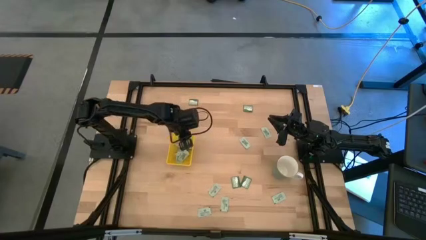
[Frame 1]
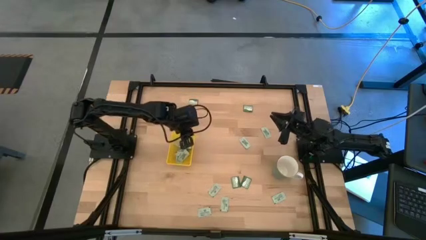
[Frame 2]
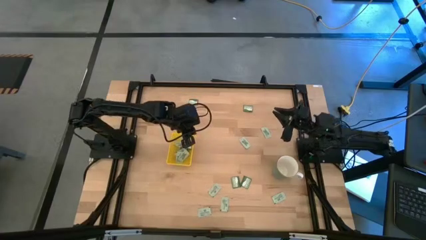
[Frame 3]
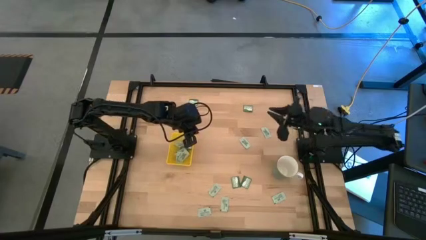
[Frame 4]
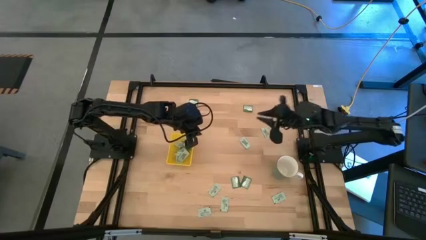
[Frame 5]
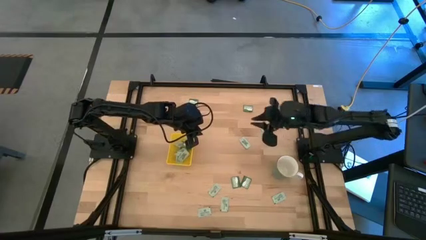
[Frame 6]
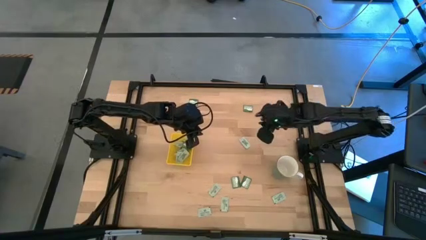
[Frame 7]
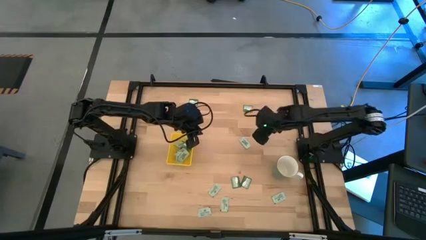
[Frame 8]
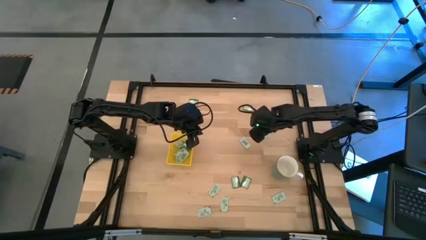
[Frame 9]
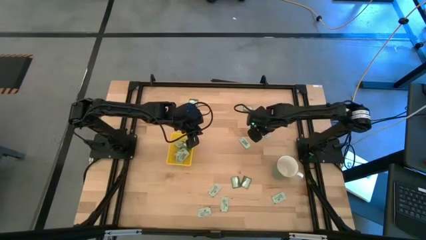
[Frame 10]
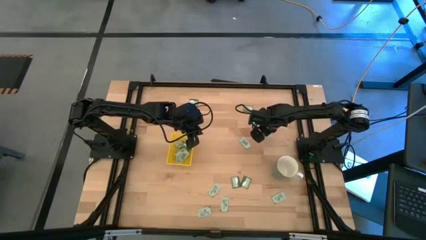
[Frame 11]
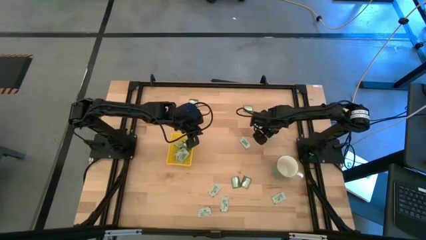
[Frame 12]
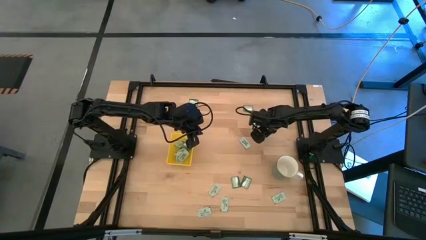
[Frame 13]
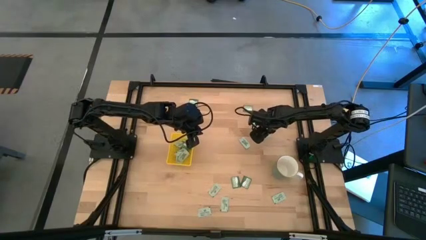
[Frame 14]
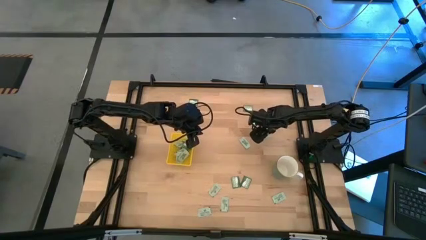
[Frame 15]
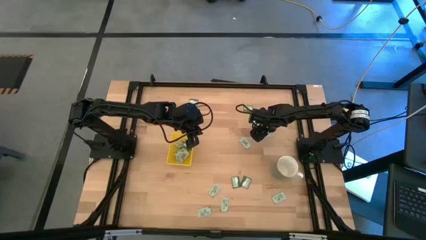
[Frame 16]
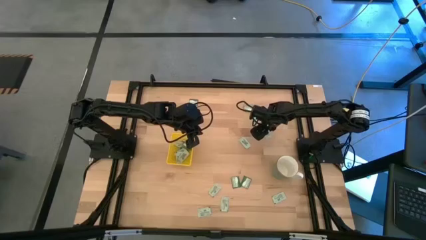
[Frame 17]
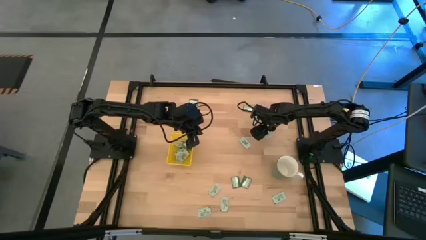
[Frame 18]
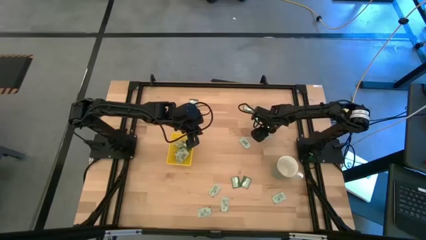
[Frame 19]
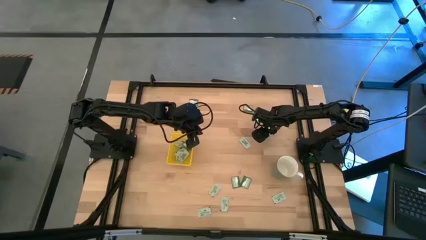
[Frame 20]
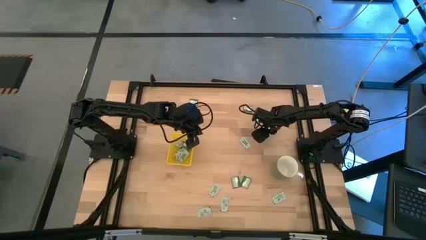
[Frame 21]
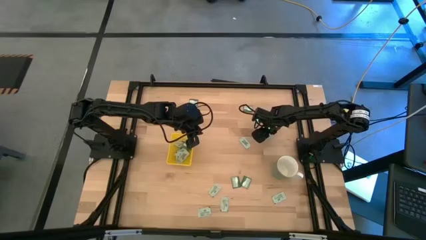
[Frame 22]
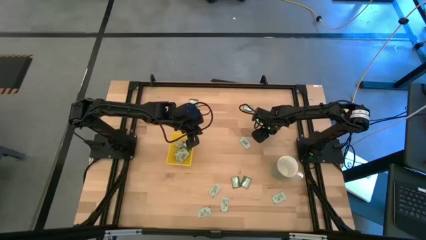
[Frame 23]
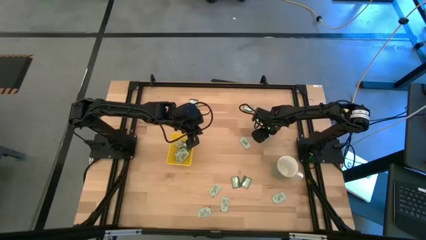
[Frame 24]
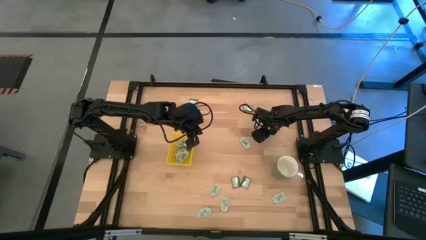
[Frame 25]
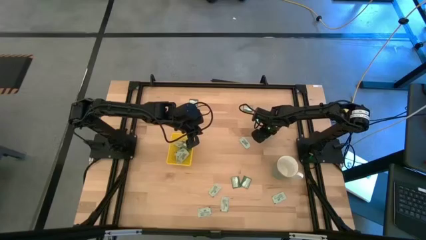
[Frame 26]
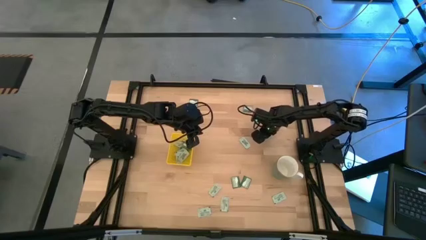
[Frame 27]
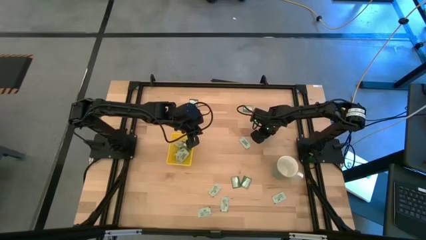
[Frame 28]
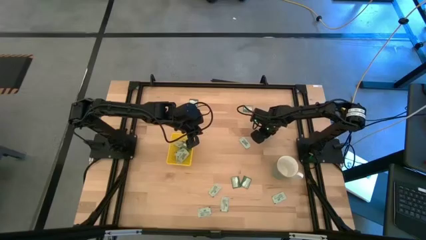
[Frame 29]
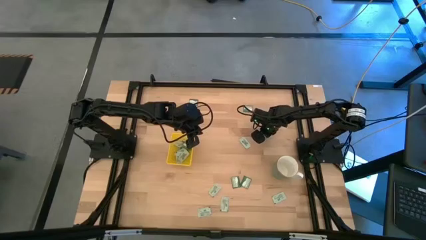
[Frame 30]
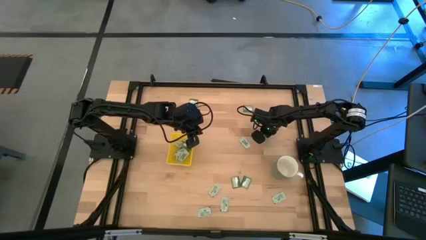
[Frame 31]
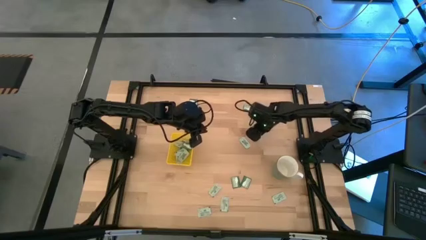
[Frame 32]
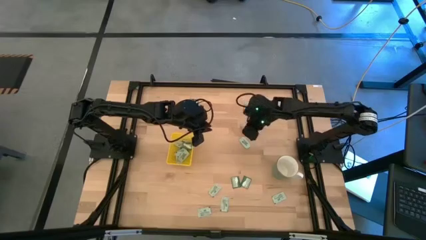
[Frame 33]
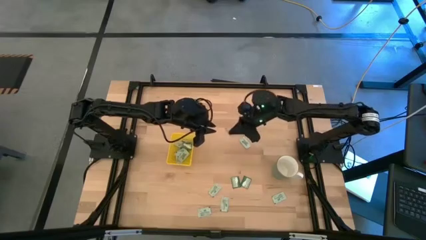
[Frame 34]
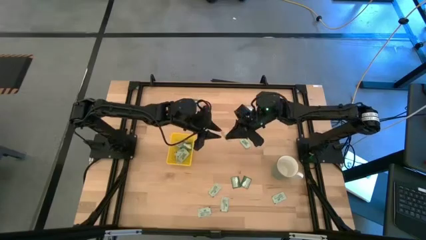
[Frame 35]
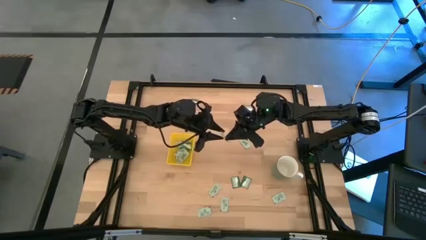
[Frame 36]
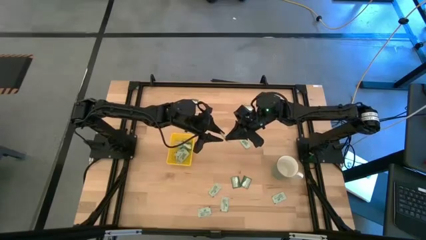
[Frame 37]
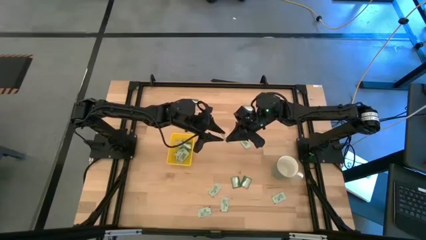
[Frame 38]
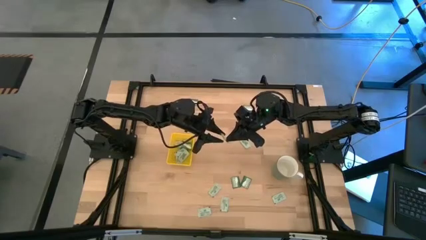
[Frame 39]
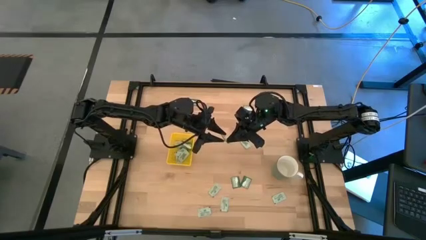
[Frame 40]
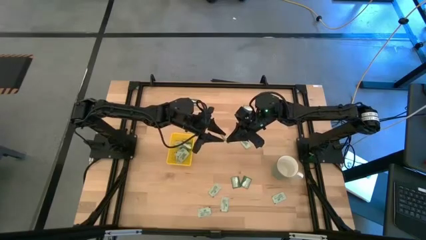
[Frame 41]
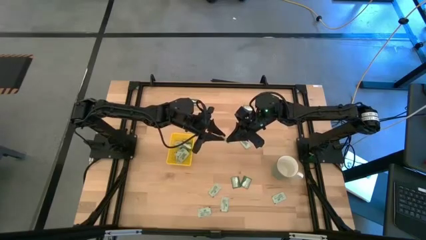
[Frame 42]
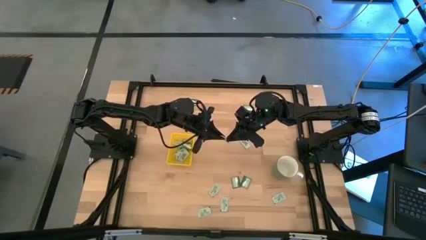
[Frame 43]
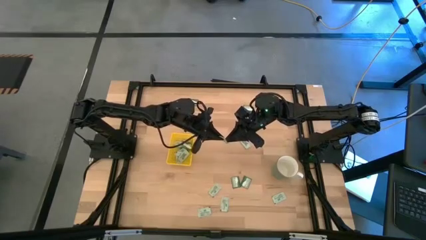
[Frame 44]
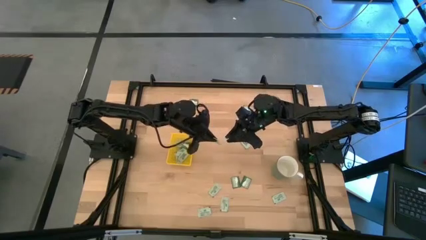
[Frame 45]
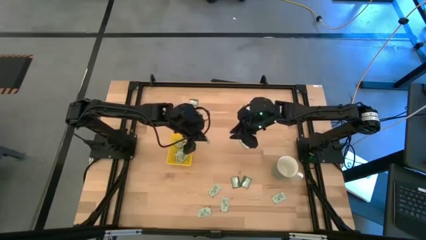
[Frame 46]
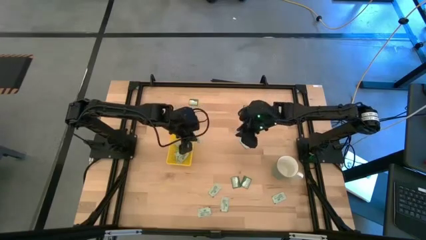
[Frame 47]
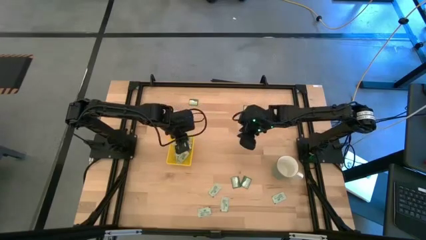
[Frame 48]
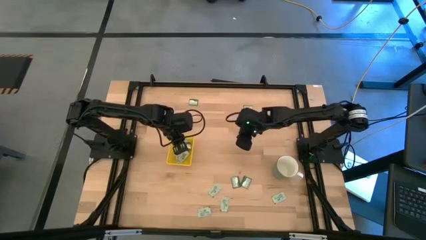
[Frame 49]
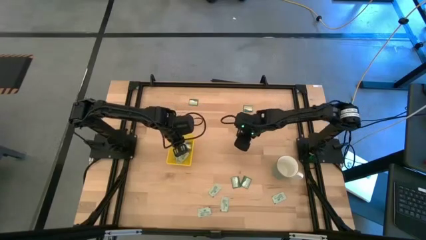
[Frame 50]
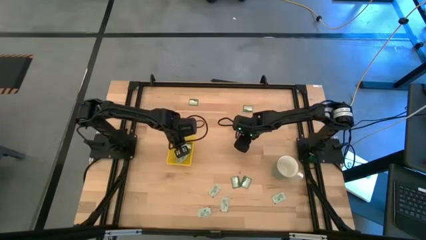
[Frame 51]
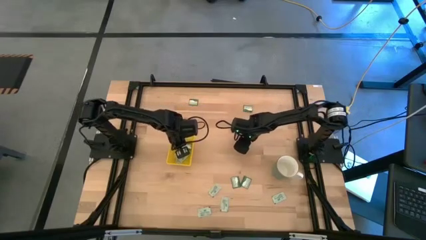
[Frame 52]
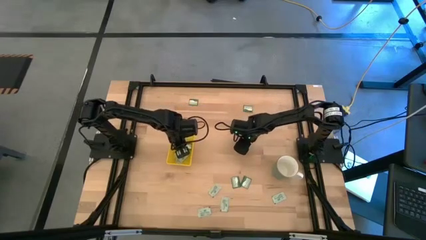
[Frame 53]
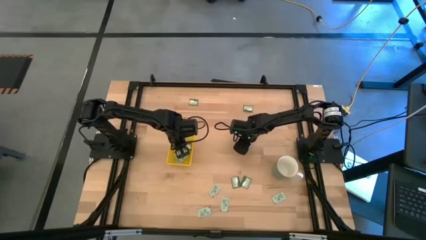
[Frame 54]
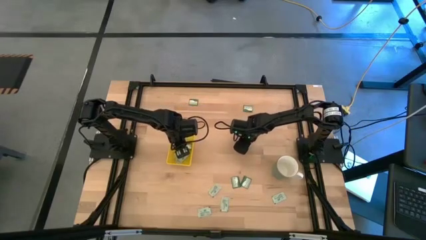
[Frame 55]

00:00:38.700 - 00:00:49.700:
Task: Pick and place Stevia / Truvia into bins
Put the white packet into the yellow bin

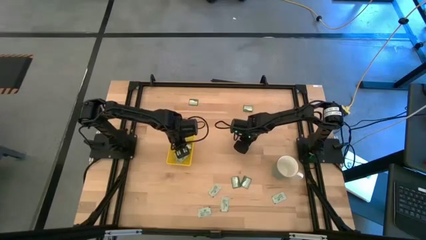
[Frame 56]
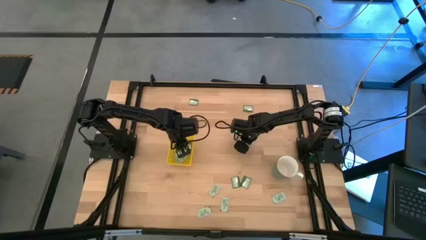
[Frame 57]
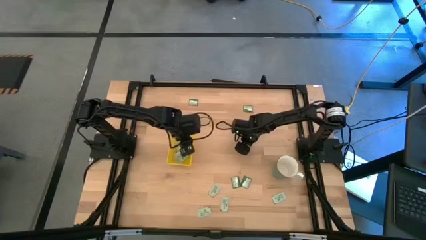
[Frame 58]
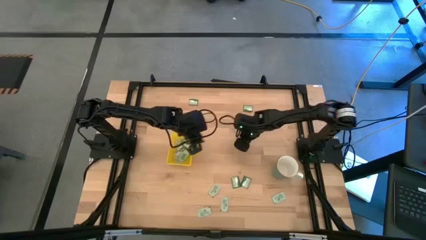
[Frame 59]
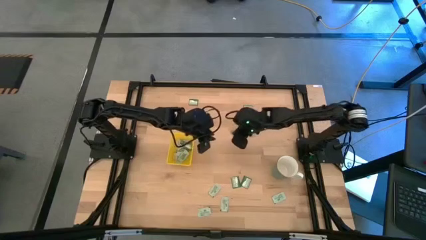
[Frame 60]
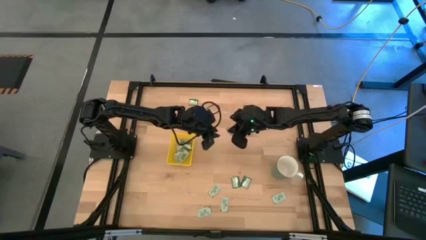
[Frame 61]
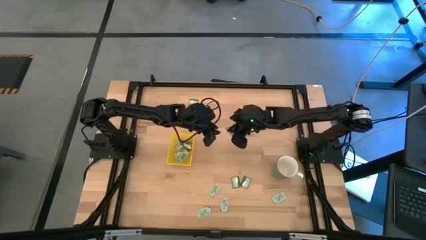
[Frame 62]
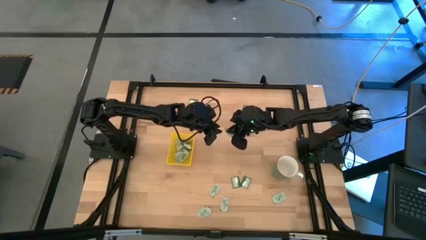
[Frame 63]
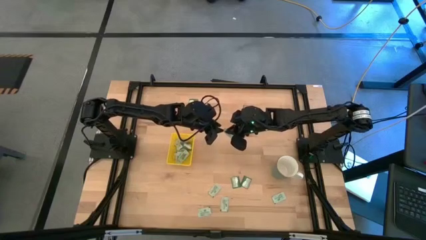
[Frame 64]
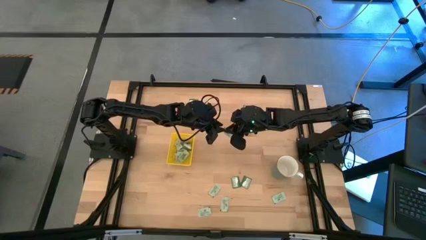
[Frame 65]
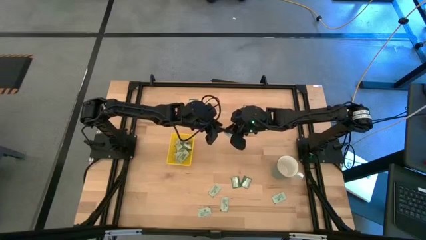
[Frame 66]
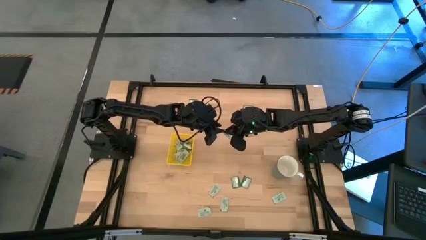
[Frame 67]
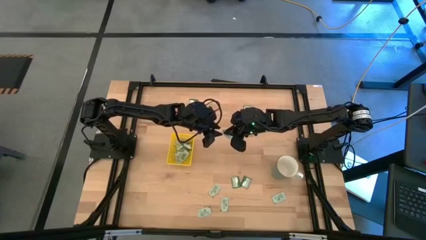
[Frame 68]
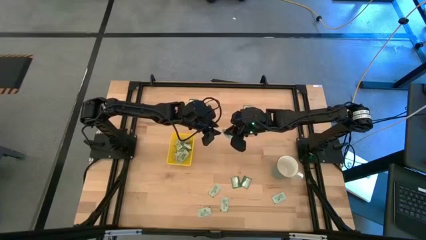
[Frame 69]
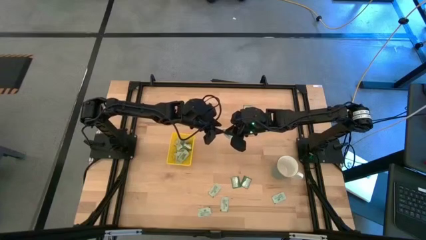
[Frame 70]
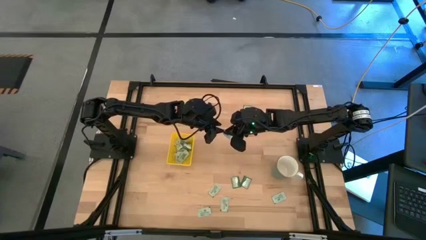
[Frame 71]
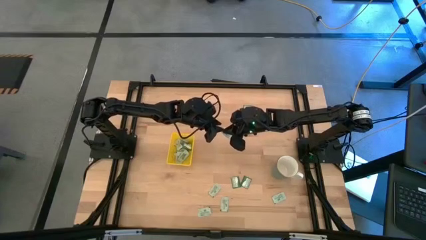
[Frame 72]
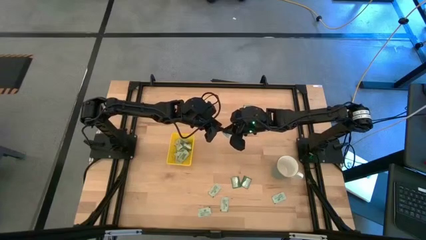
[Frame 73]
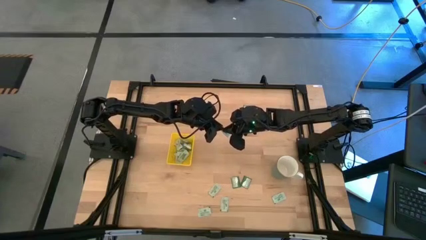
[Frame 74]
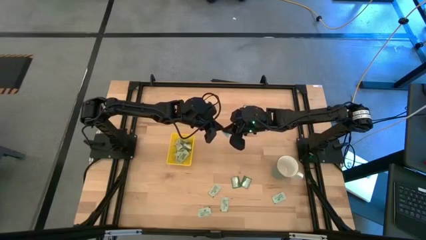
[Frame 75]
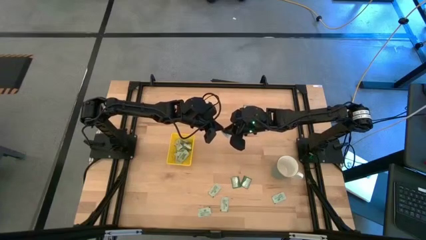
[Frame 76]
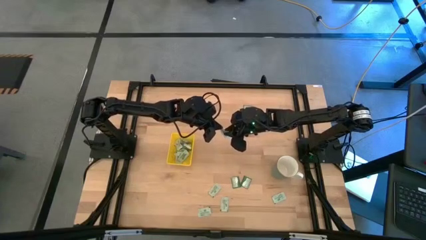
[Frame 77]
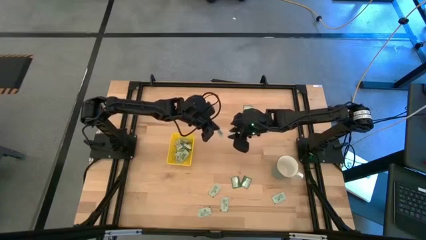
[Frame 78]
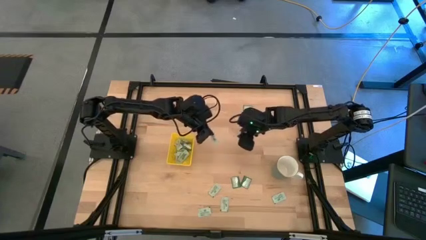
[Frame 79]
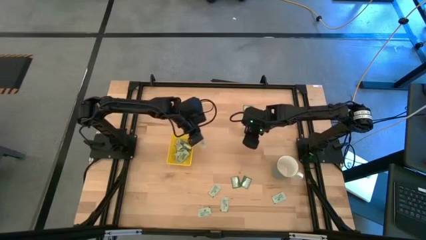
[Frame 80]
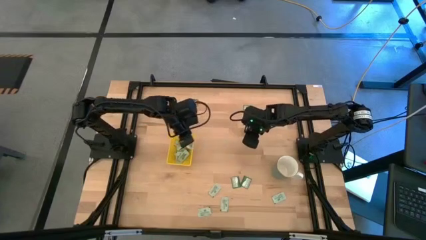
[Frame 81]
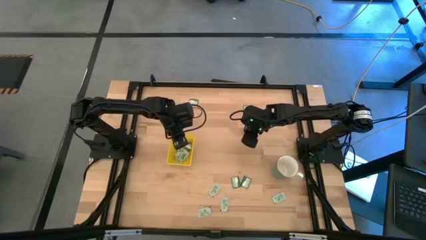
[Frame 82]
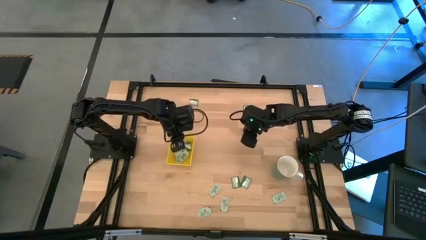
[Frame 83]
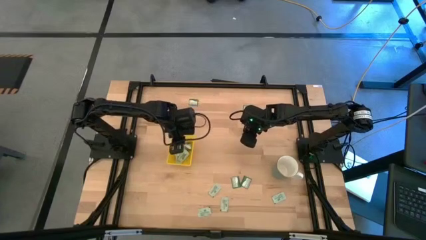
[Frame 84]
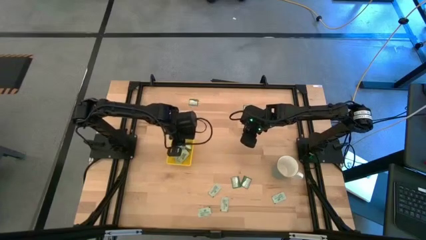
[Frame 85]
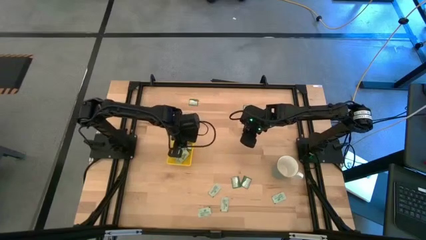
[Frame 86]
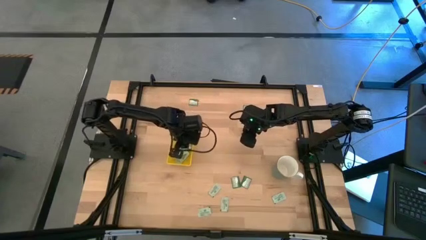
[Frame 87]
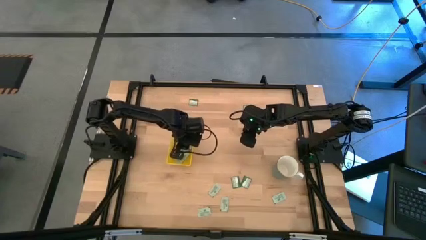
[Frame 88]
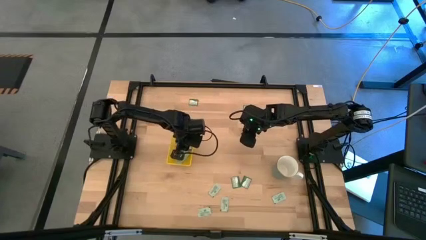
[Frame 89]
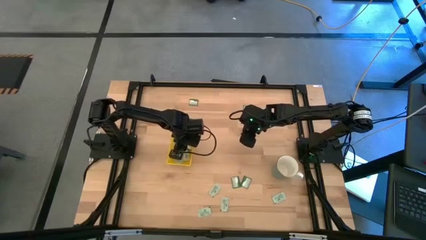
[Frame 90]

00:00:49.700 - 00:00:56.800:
Put the white packet into the yellow bin
